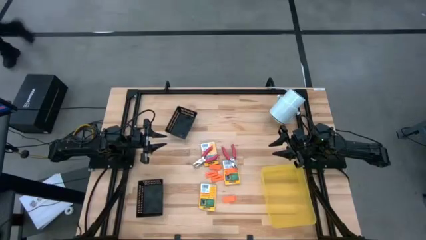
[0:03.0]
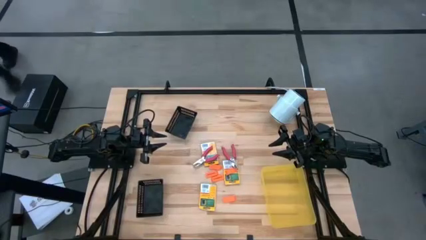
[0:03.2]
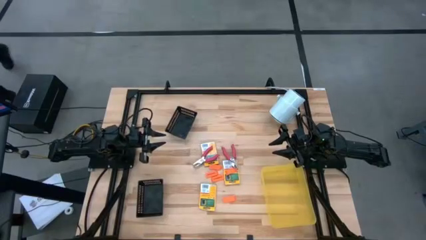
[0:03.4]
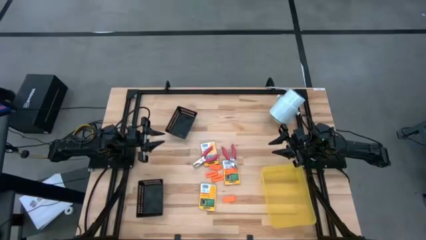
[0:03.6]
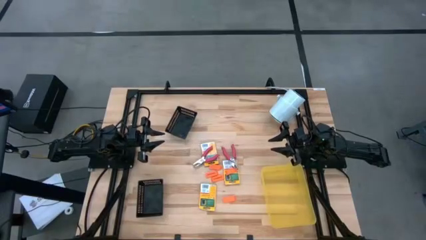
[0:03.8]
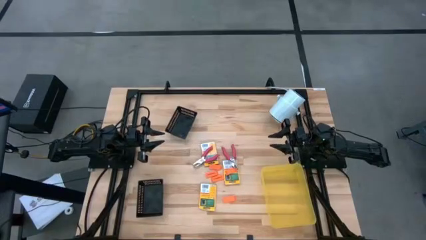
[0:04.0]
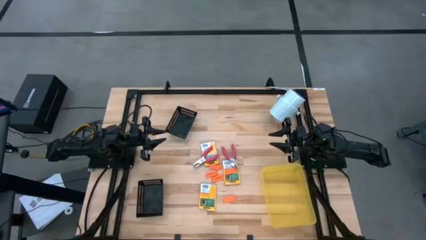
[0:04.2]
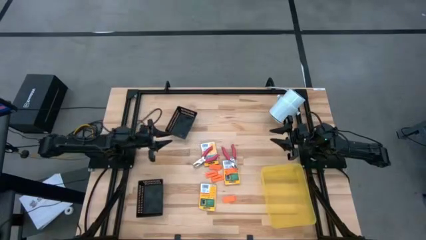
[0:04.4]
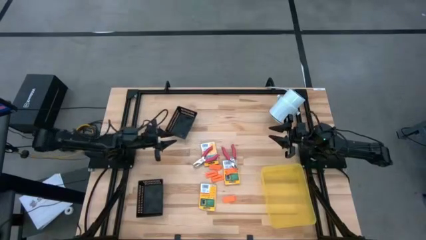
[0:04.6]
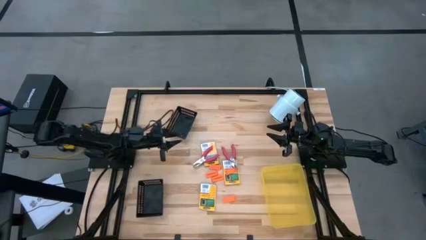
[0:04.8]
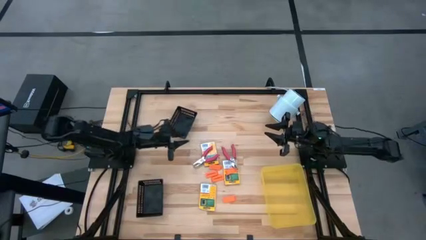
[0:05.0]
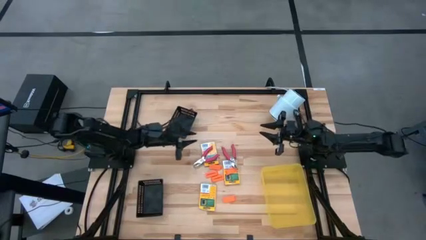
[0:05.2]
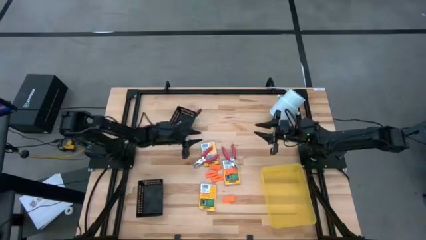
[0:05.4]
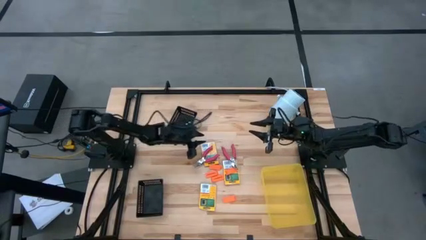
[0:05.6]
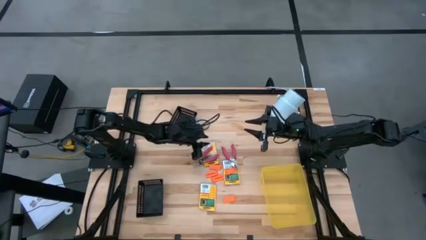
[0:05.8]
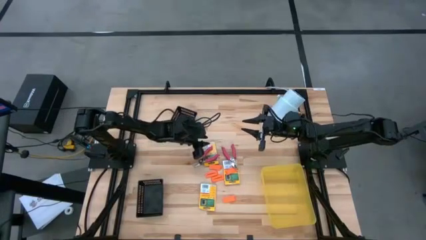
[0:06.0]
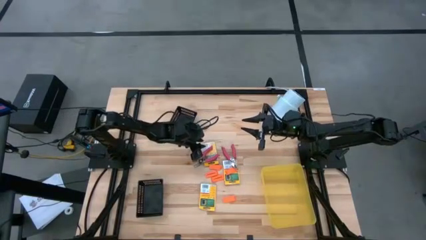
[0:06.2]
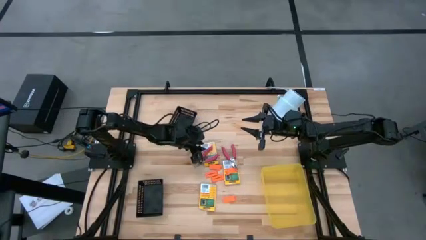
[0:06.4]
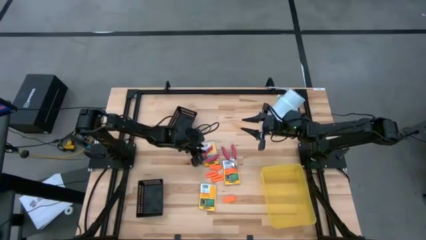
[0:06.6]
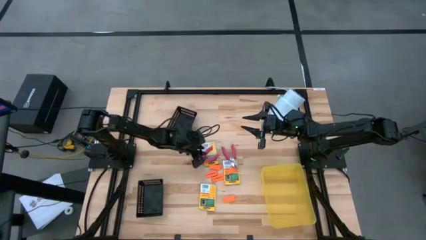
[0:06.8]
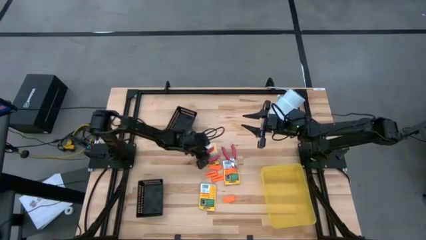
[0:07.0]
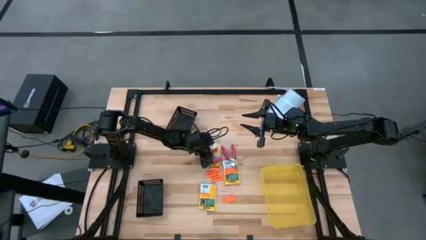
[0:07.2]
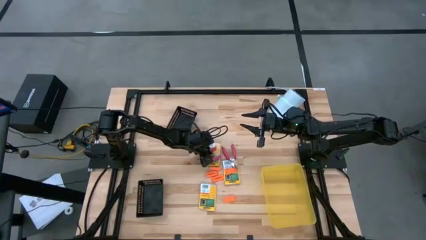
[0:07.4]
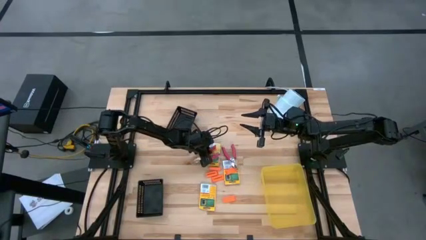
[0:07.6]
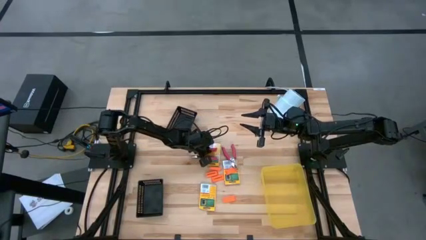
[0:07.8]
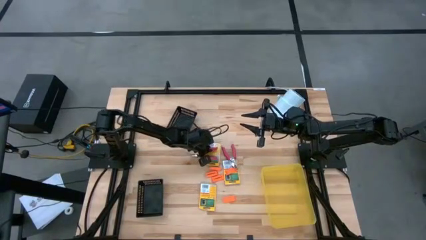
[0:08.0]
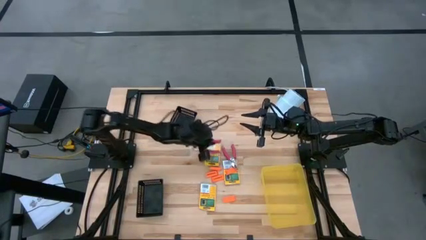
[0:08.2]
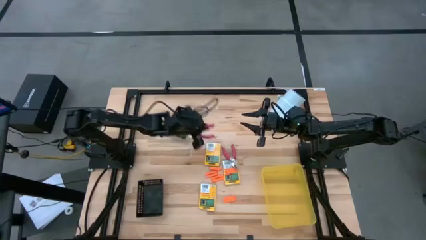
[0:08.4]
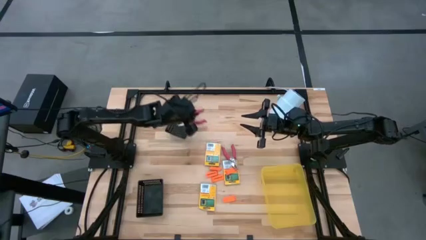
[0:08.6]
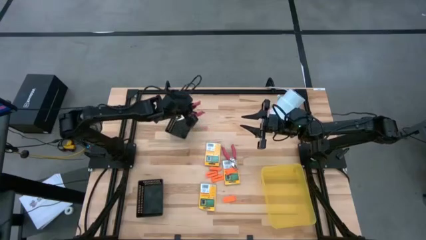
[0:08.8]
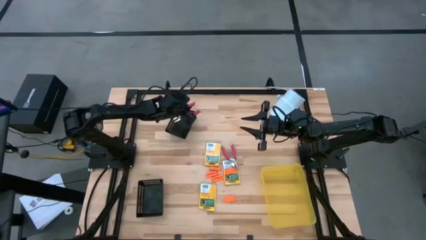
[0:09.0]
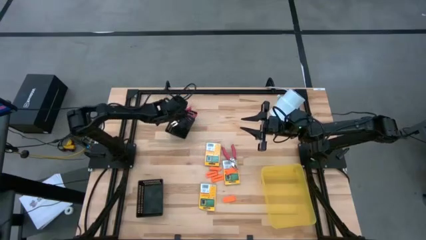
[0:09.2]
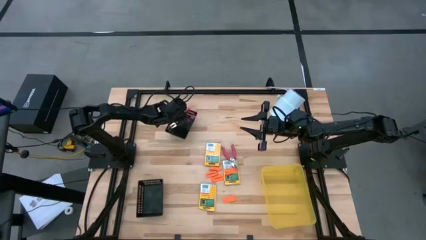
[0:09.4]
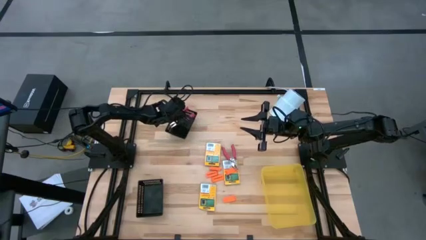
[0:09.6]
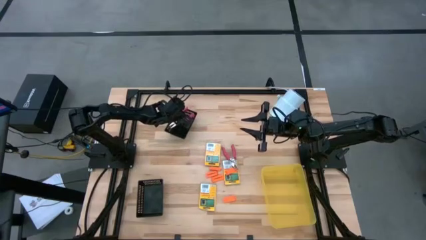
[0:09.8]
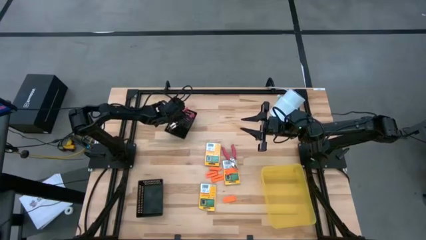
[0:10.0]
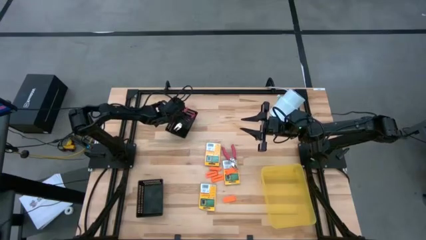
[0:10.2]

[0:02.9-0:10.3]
Task: Pick & Place School Supplies
Put the pink hole puncher into the top black basket

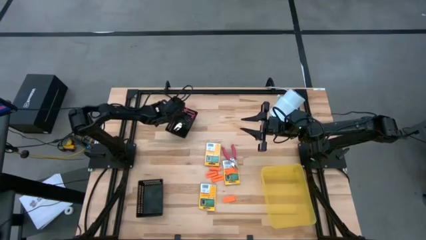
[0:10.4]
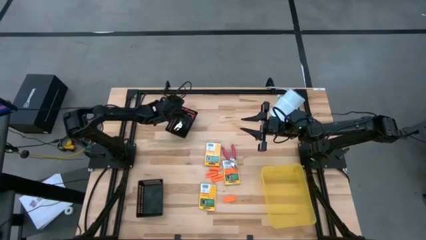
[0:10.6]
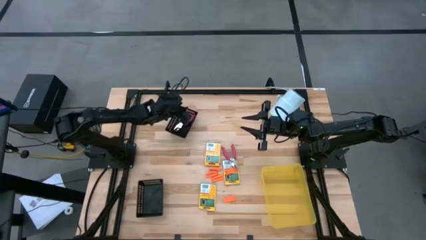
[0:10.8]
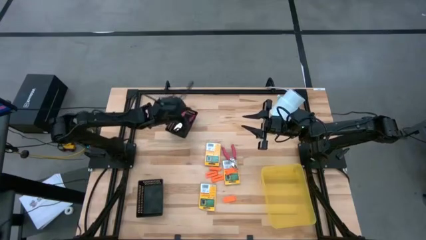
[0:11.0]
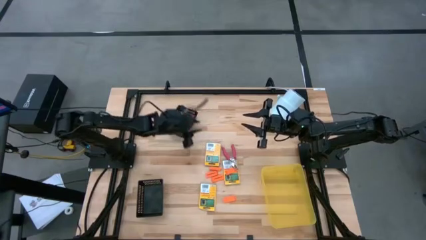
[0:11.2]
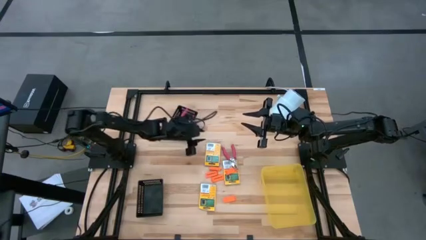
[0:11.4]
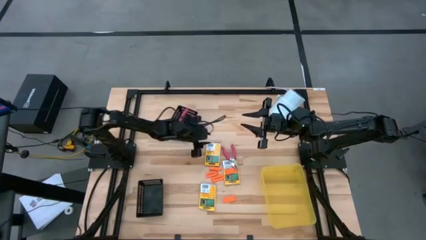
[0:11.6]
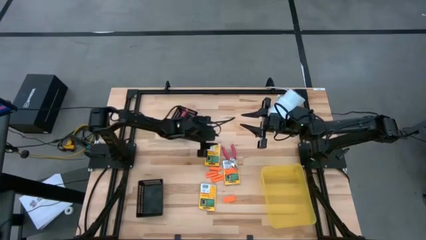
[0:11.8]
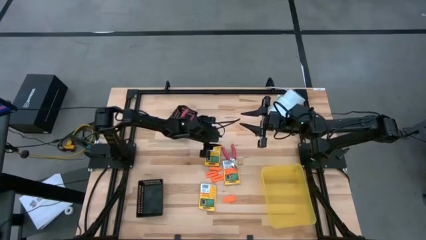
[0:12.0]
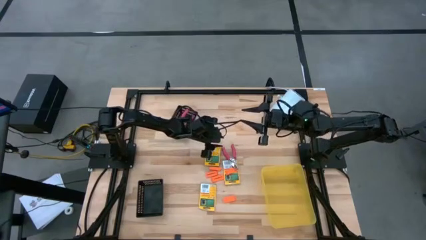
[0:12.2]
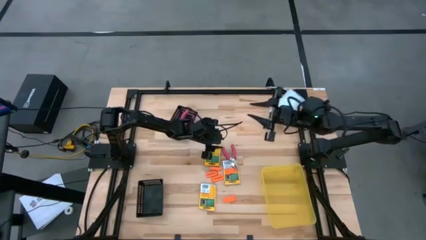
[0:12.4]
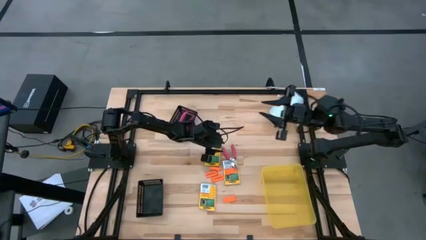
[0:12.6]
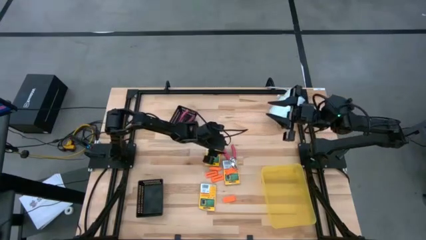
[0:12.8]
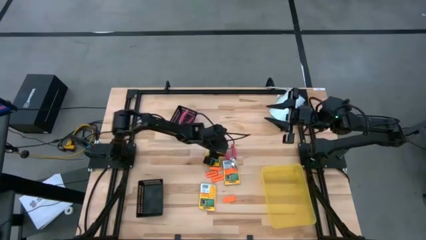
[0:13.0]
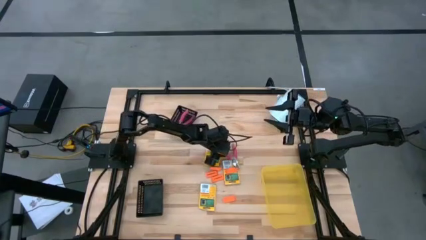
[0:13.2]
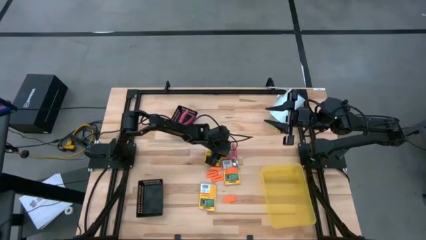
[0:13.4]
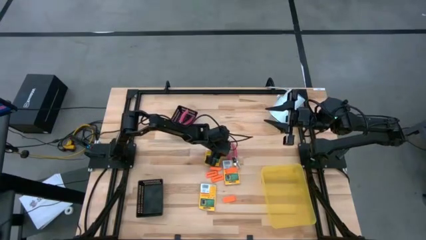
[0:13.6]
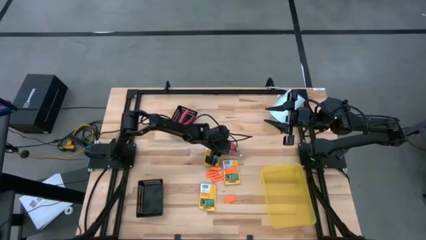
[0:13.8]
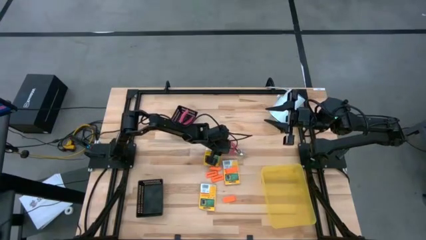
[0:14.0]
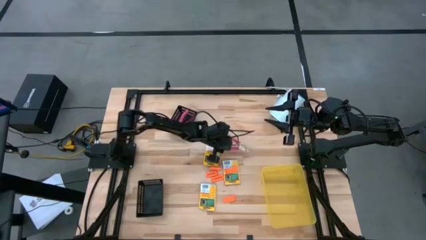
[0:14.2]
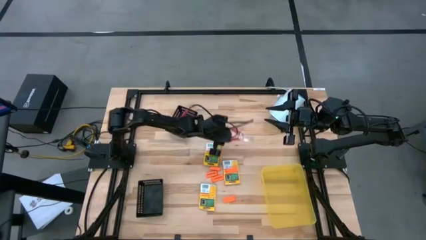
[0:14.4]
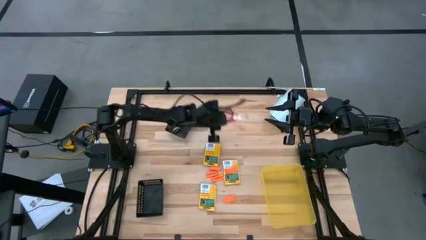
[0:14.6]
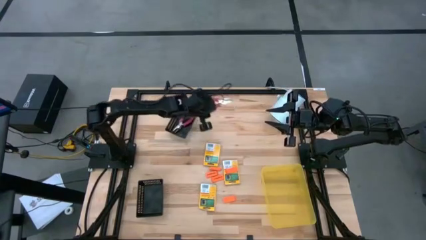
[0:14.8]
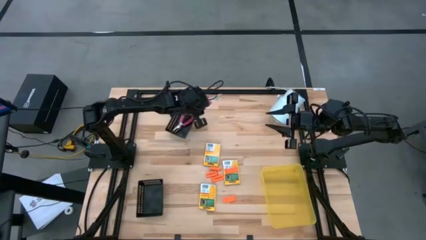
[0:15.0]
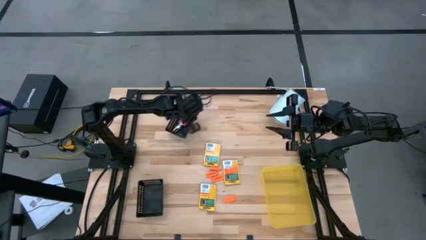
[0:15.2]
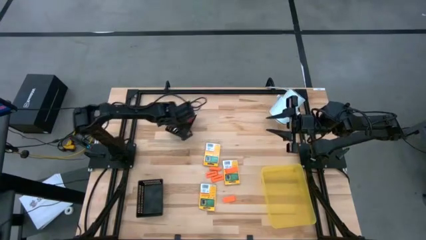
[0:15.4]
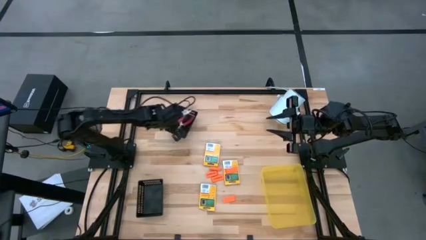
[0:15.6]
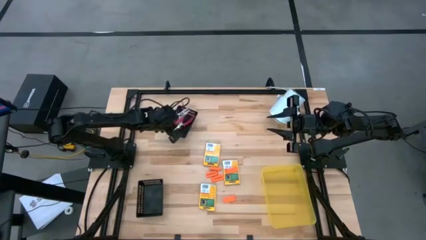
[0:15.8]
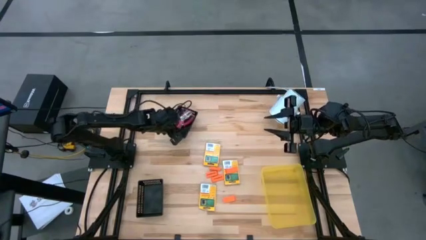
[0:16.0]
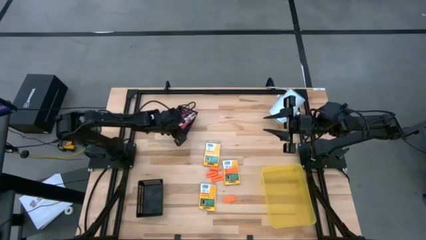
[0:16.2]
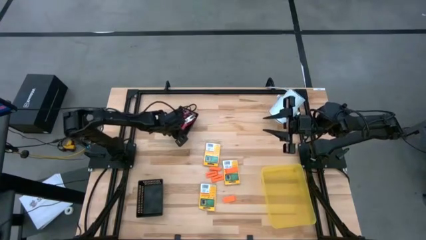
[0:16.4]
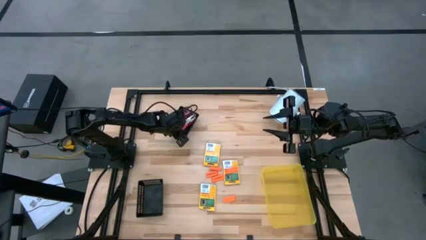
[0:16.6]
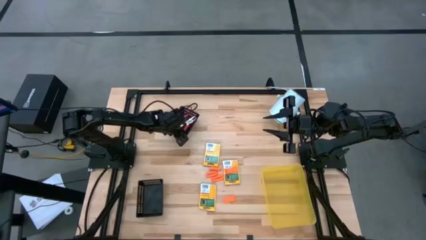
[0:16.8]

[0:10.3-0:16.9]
Put the pink hole puncher into the top black basket

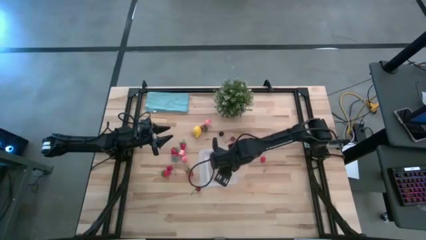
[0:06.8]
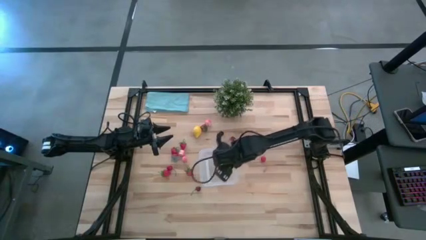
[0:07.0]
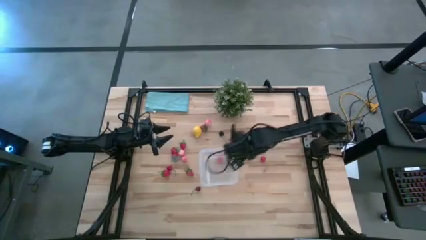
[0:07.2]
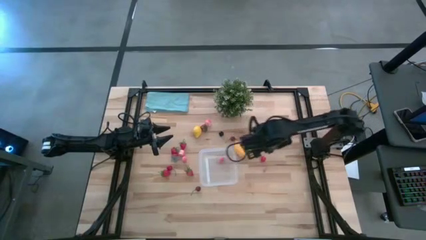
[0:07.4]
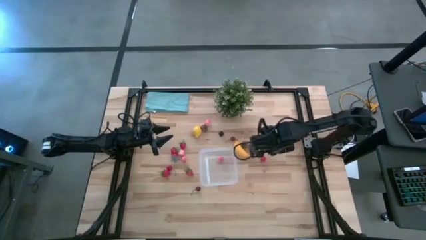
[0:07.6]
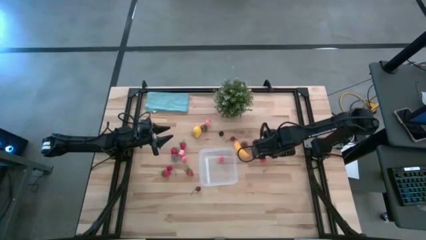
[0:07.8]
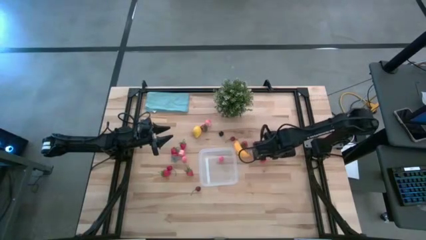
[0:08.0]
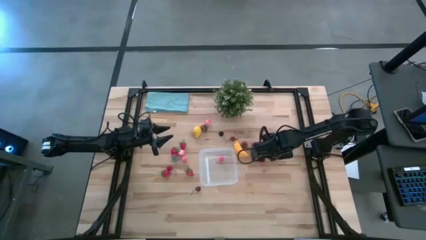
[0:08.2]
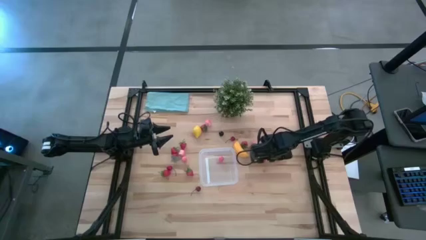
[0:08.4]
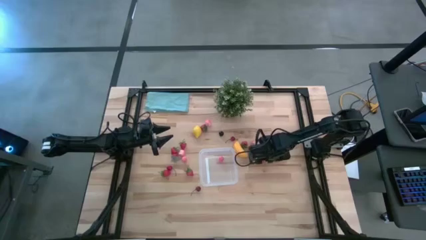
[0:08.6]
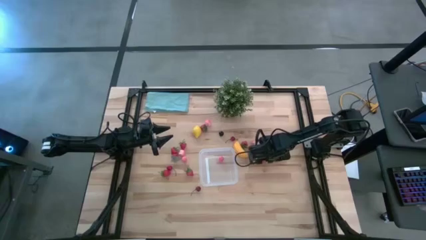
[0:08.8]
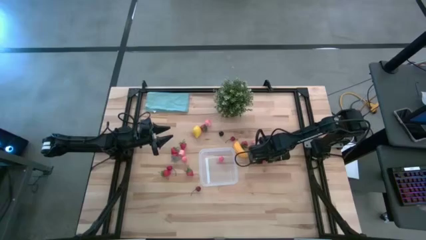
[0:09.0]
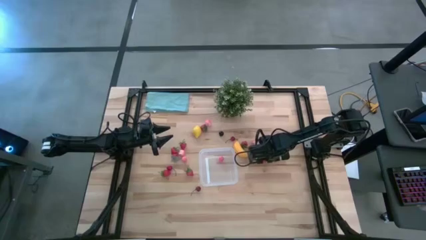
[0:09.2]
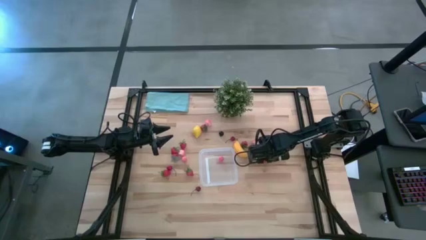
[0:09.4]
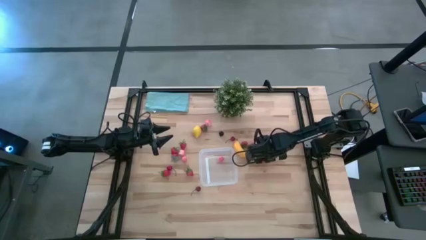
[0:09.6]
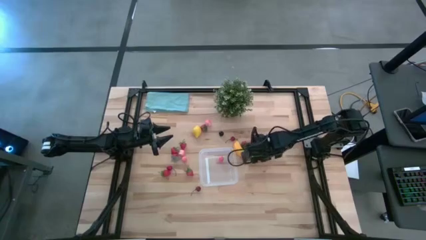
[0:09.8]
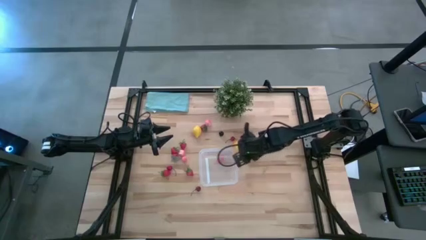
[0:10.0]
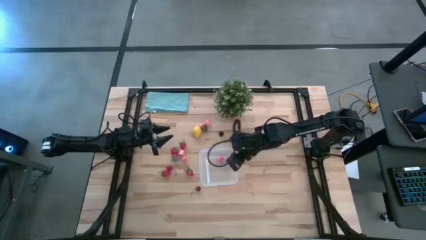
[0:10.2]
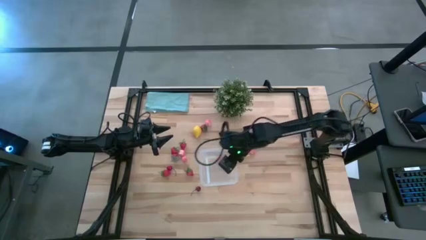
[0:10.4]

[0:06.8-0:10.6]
Task: Pick and placing Produce into tupperware
Put the red cherry into the transparent bin
